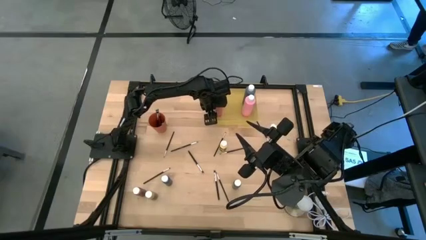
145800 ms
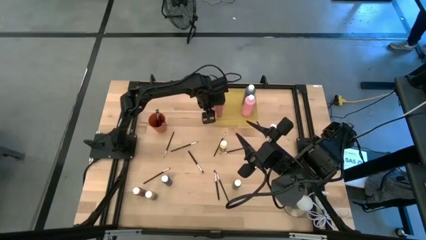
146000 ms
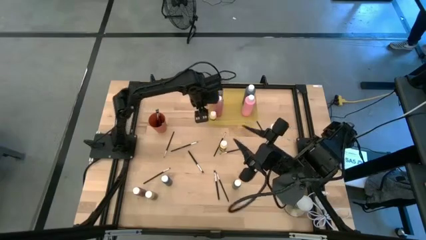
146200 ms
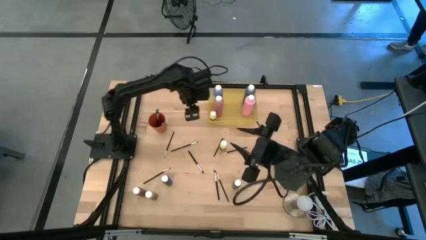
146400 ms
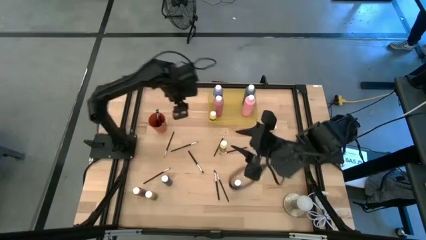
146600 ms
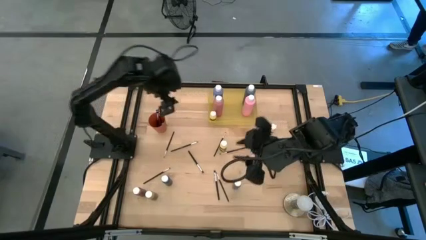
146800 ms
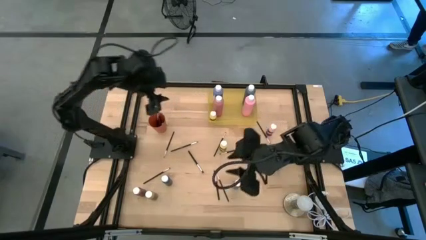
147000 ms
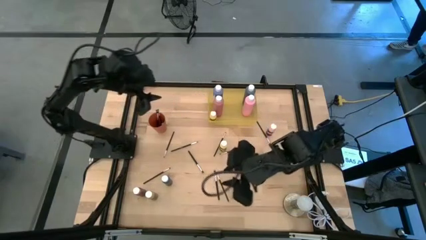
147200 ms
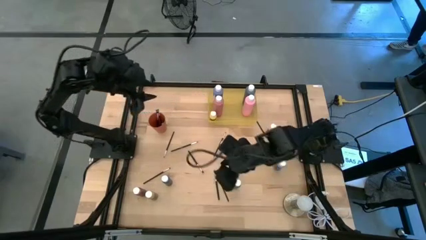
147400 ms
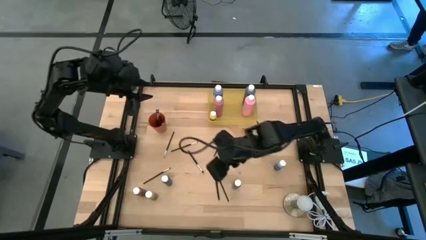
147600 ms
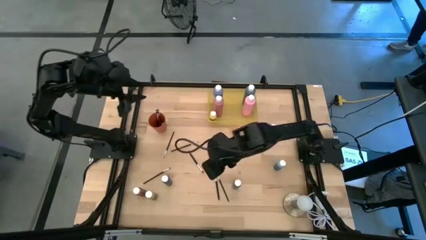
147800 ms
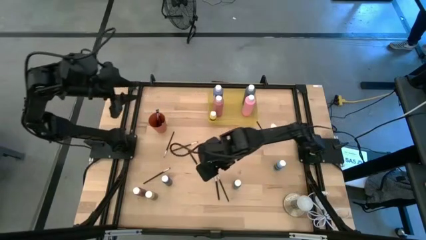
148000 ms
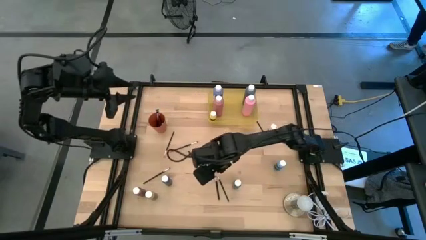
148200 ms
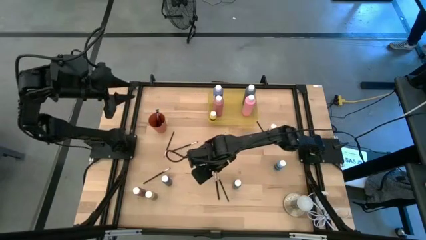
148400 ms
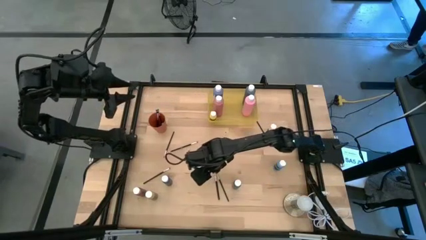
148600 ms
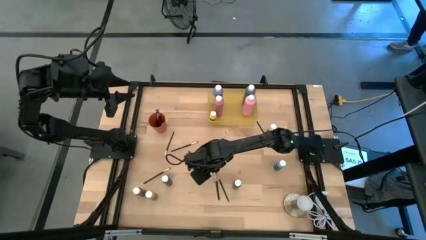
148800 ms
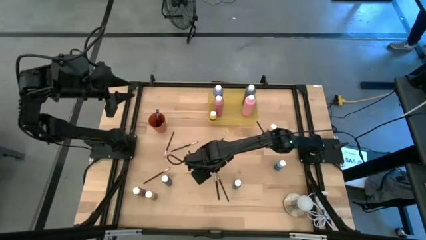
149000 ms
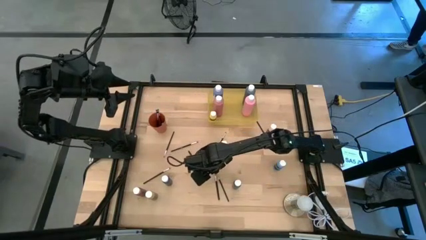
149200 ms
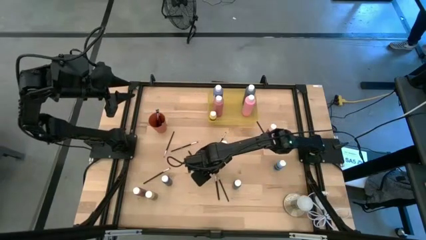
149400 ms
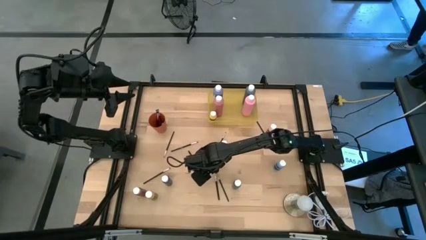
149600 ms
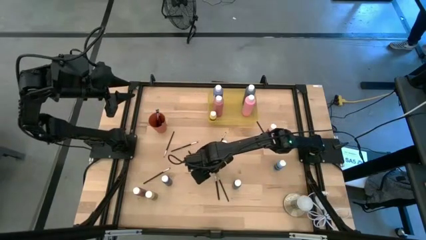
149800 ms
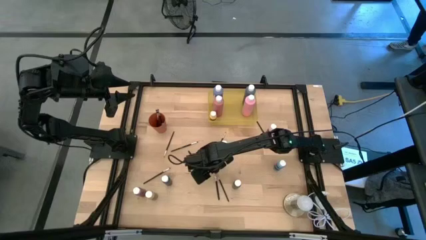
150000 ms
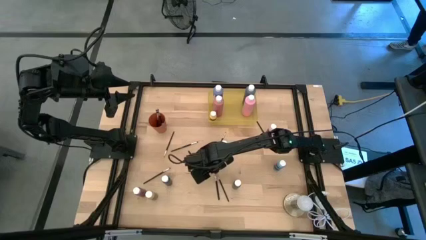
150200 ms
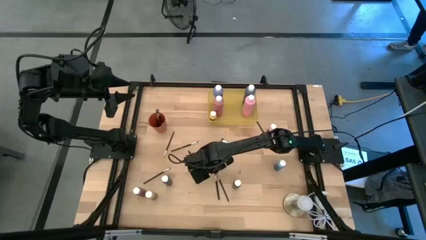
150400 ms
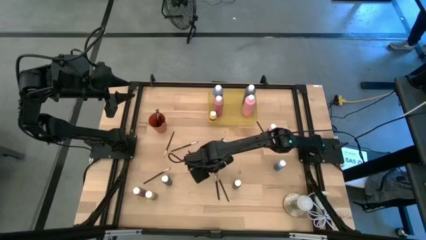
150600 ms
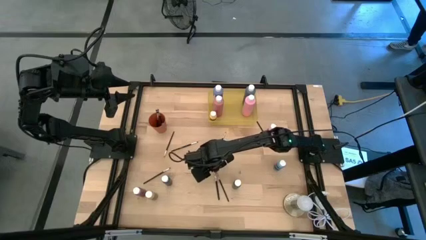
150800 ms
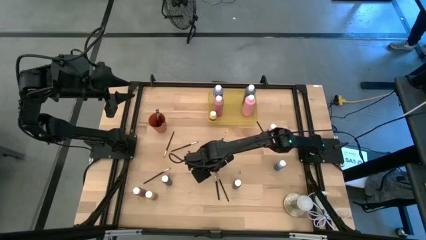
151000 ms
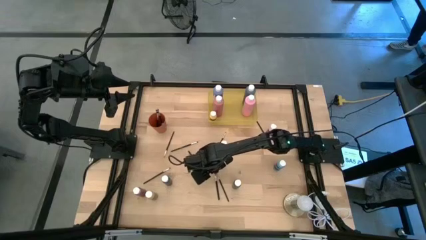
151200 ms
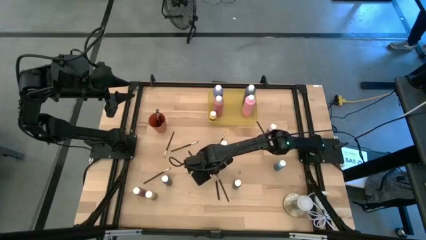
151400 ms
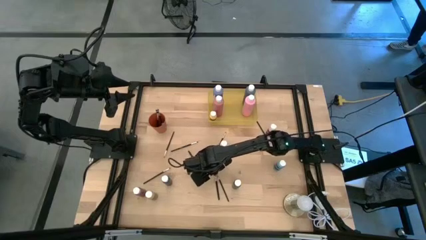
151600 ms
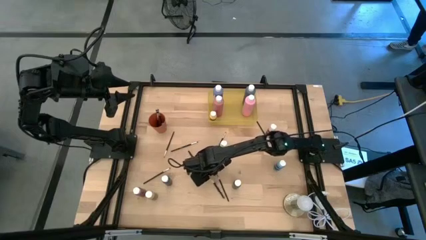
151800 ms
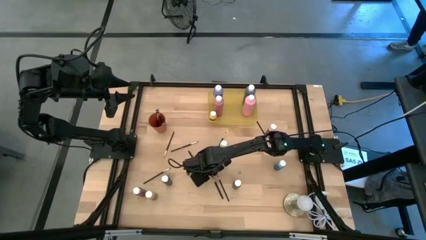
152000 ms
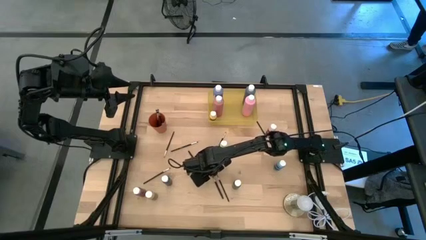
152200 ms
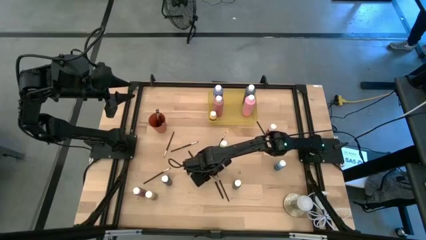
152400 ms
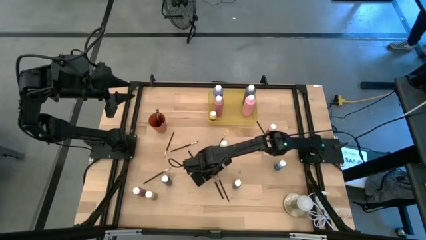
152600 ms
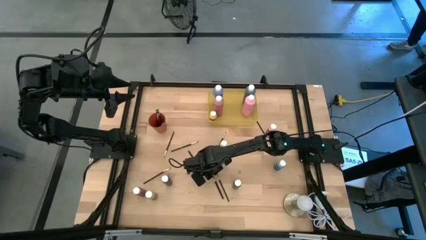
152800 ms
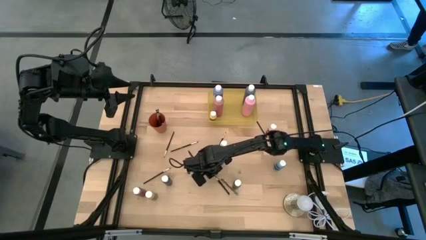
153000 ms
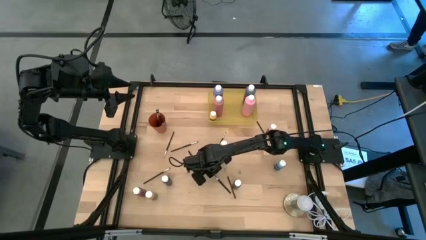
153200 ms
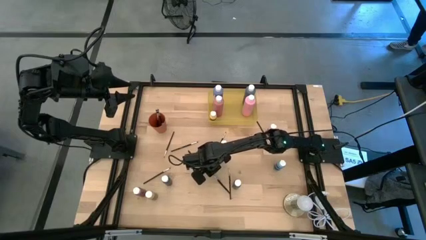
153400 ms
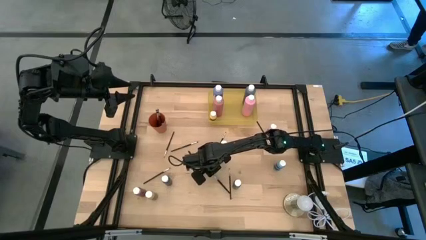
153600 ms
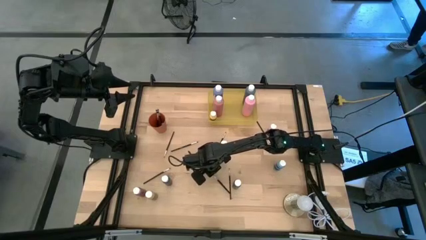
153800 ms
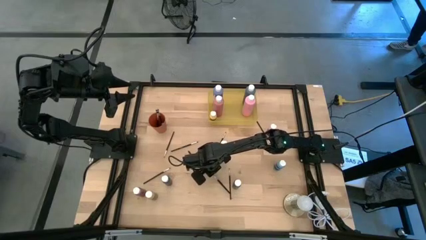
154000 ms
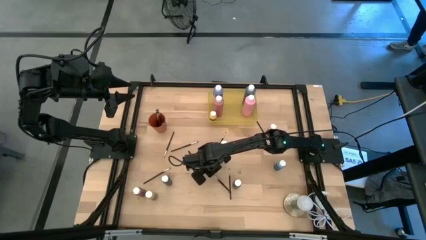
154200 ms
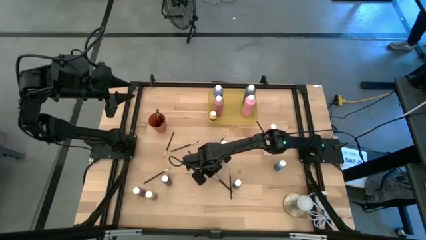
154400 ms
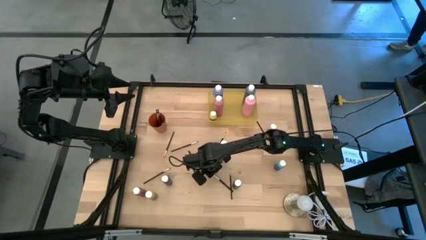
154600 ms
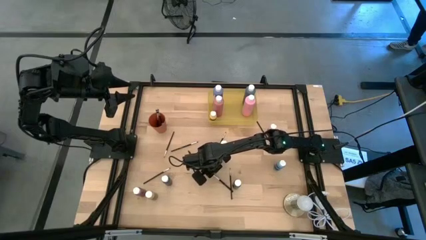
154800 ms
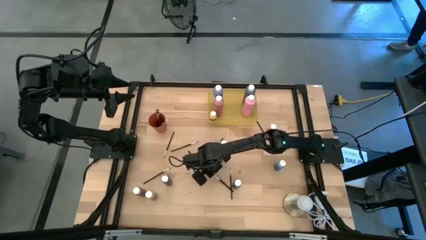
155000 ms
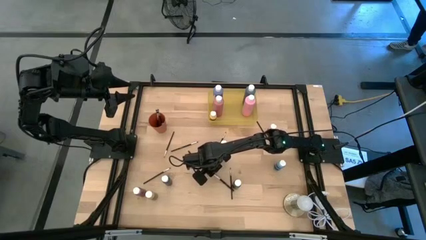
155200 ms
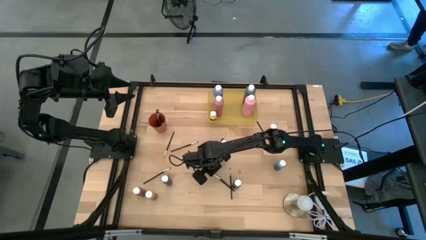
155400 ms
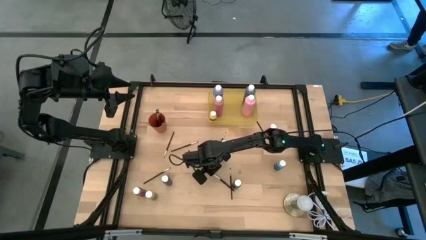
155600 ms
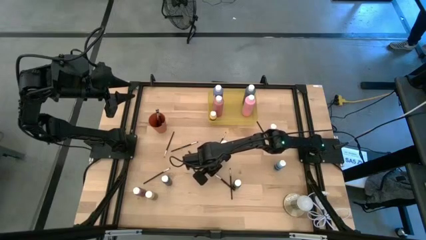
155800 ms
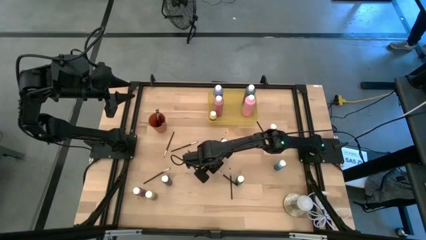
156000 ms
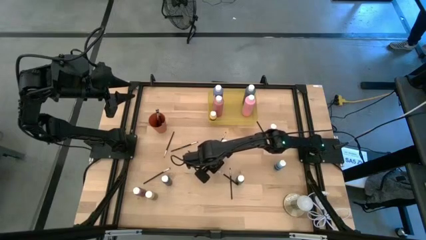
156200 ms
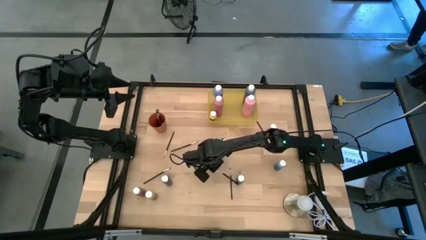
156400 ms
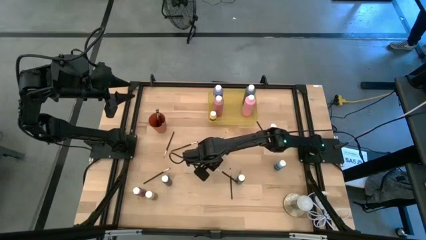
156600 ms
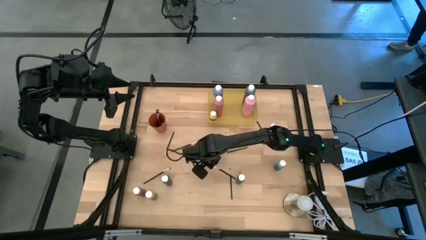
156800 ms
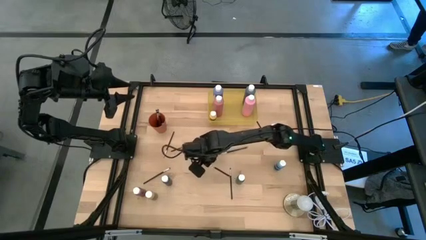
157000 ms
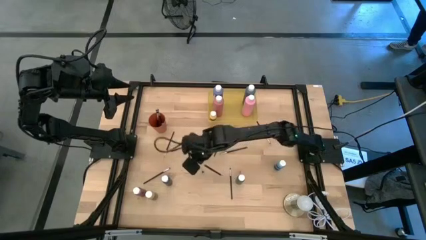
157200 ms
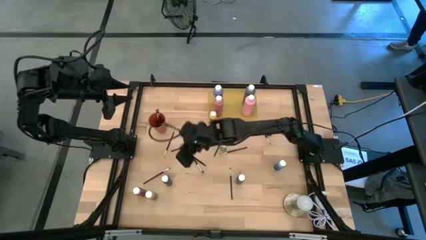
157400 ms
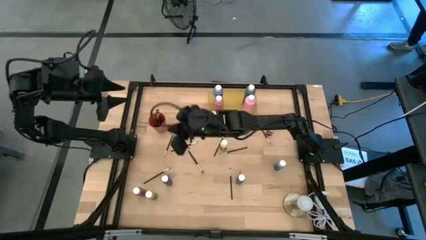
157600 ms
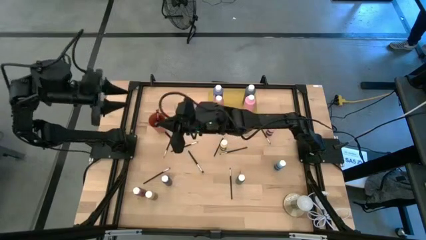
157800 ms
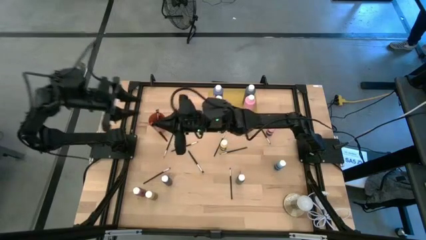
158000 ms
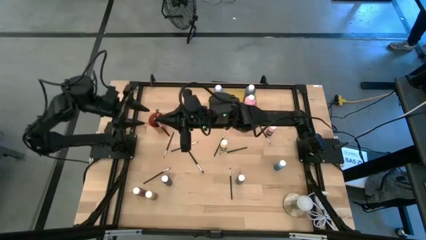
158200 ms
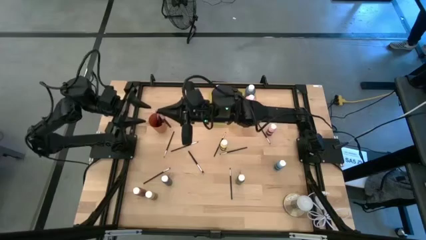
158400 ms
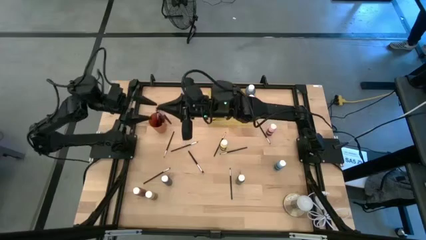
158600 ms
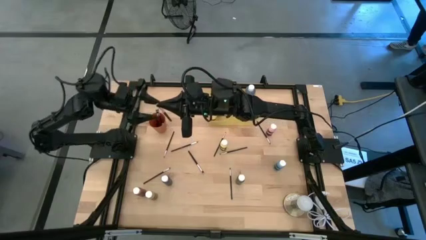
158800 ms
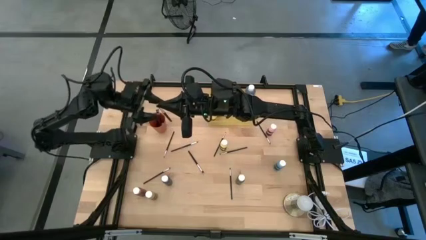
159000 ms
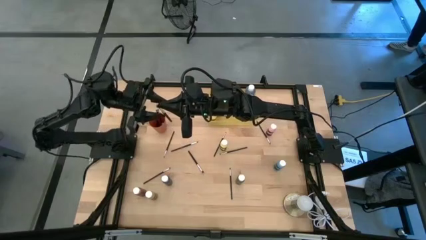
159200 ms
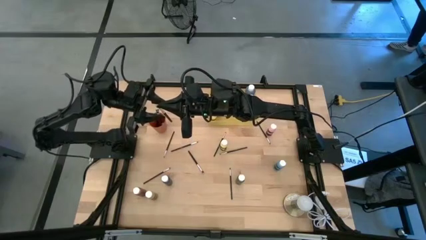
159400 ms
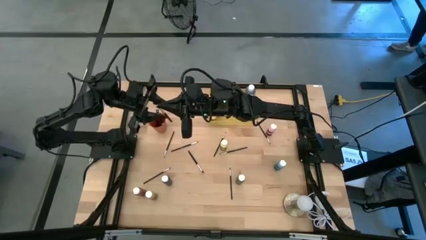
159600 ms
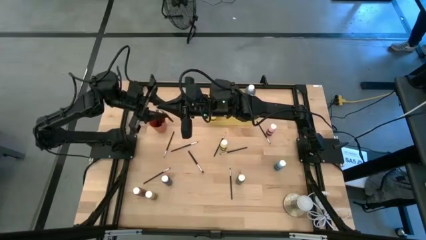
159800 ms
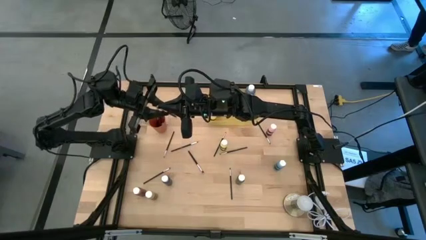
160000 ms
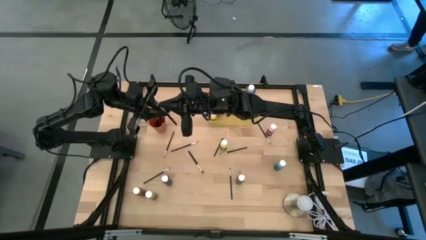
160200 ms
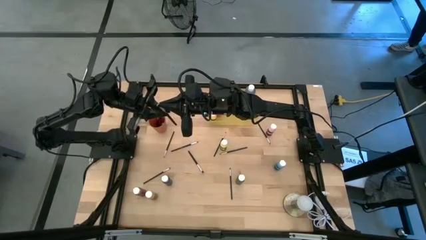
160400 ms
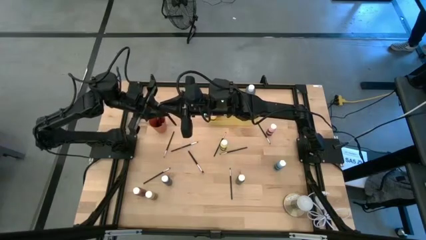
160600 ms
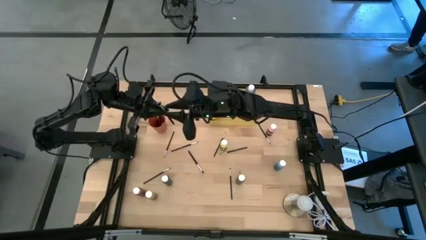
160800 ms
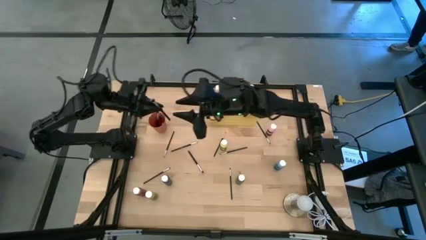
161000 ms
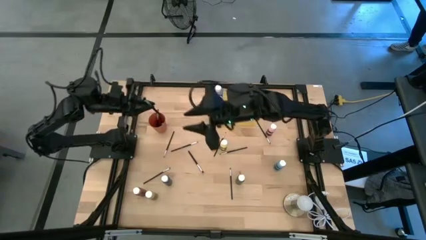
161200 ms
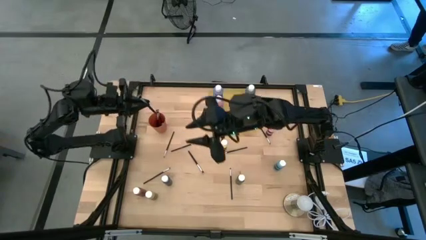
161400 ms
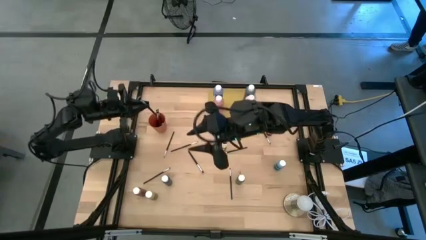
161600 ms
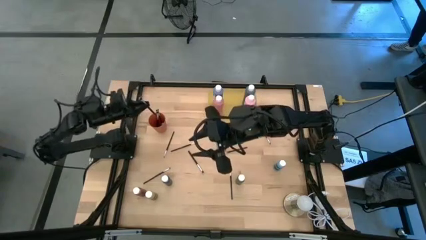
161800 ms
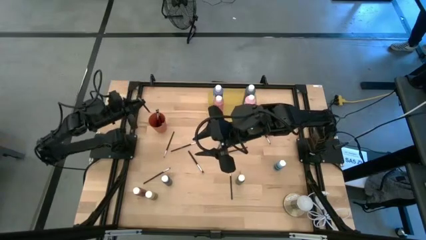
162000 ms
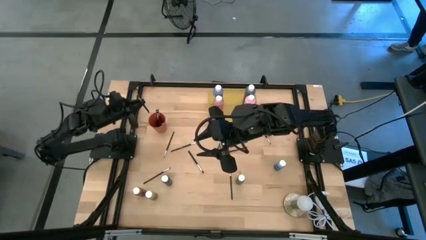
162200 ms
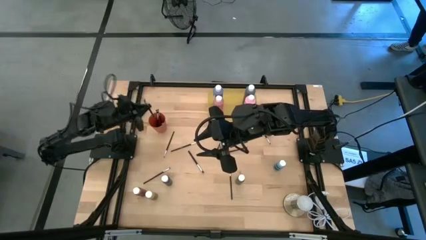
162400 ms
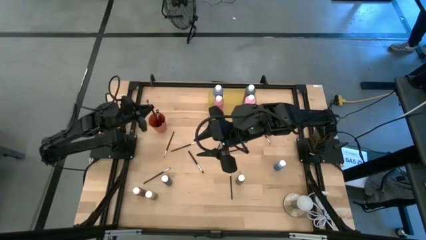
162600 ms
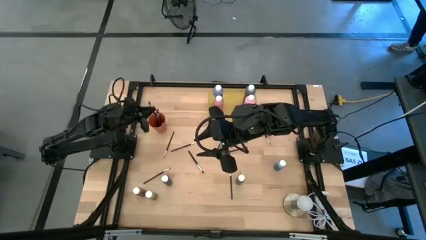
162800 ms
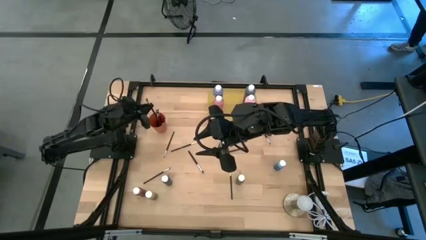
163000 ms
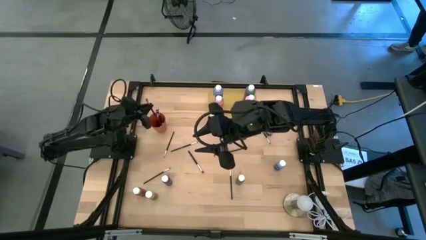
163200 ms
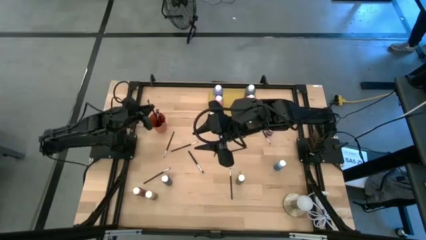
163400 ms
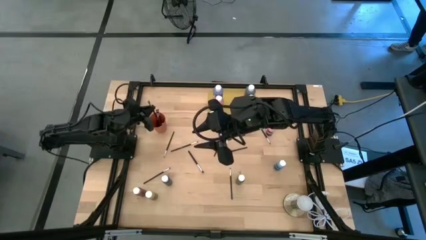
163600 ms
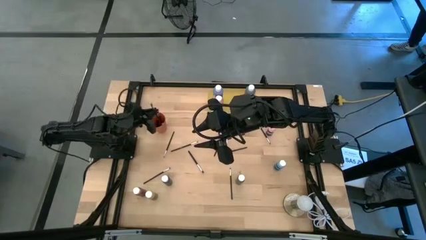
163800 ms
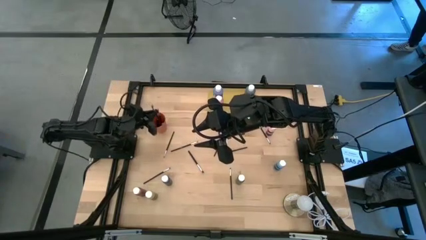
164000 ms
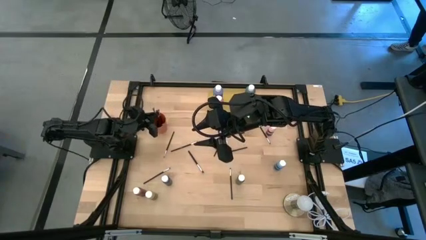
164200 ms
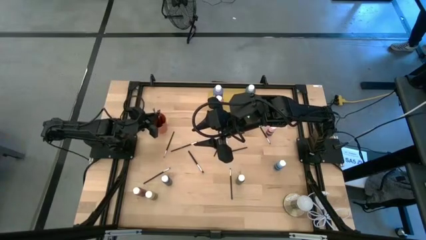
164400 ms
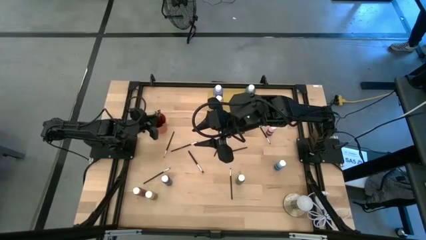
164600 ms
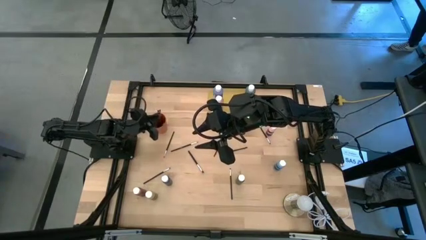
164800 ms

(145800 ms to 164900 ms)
Task: Pick & Place Paint Supplies
Put the silver paint brush into the orange cup
